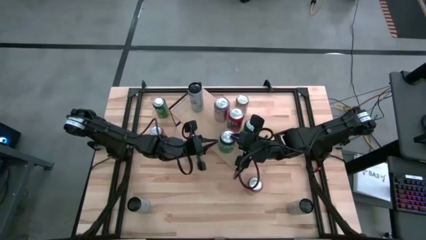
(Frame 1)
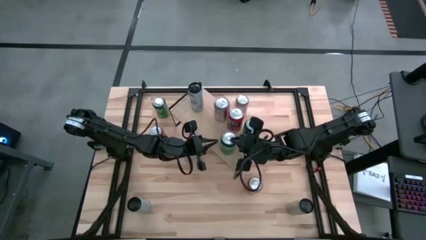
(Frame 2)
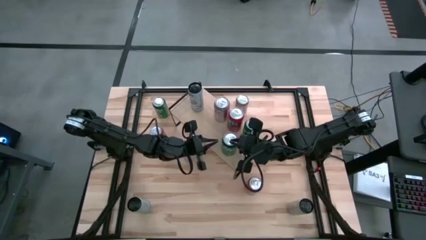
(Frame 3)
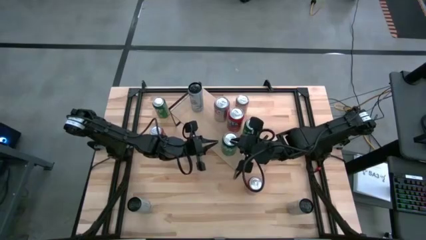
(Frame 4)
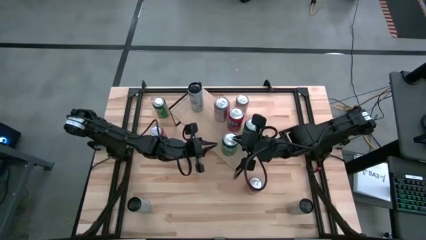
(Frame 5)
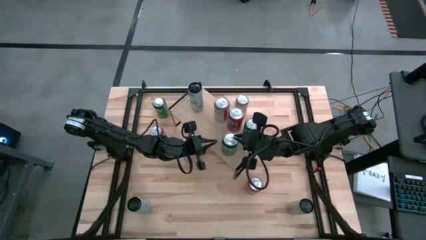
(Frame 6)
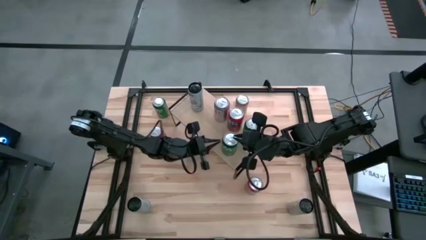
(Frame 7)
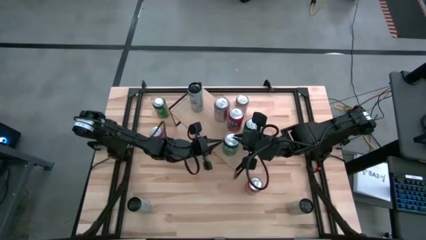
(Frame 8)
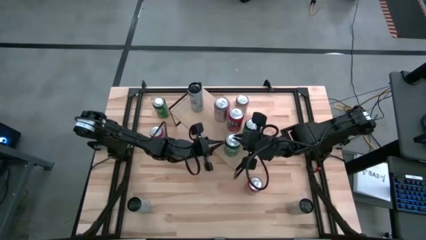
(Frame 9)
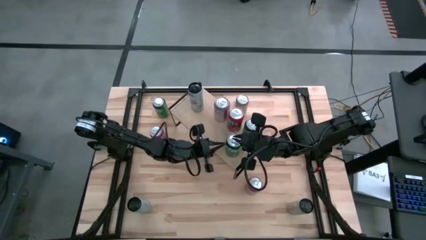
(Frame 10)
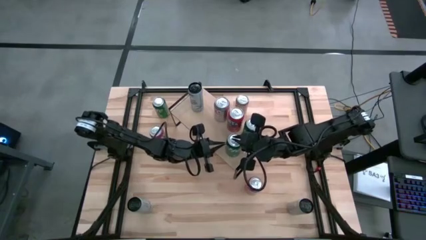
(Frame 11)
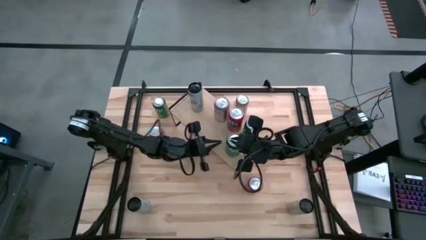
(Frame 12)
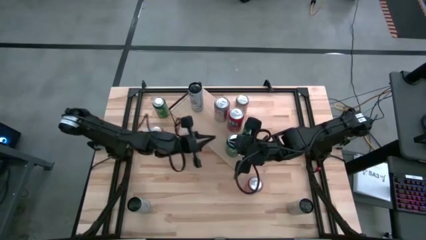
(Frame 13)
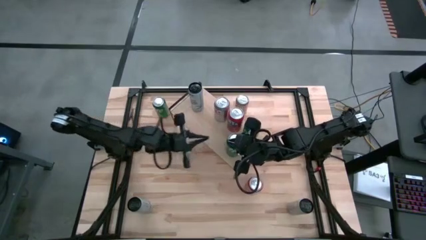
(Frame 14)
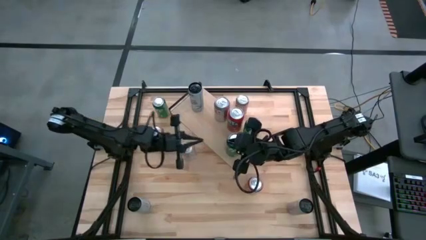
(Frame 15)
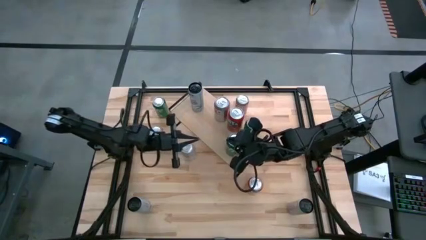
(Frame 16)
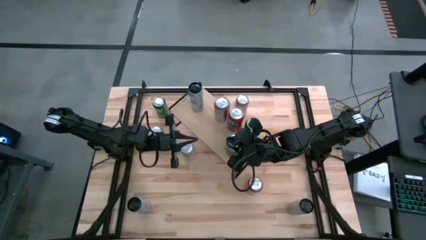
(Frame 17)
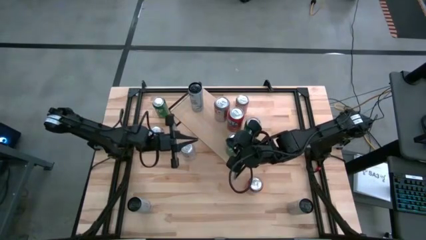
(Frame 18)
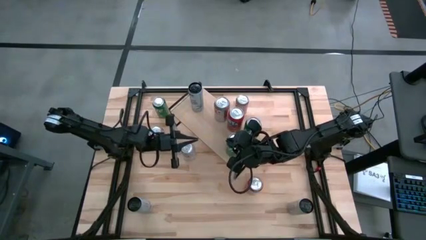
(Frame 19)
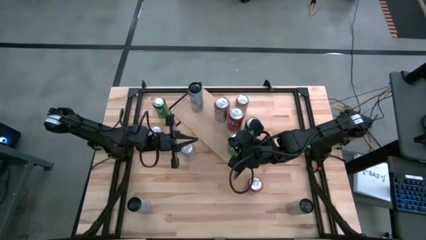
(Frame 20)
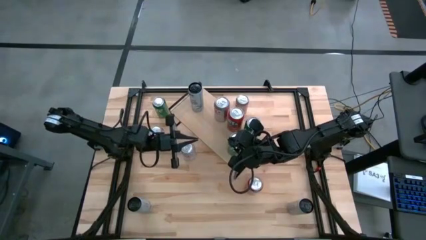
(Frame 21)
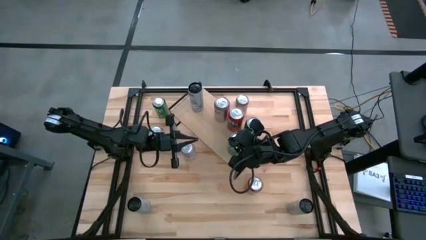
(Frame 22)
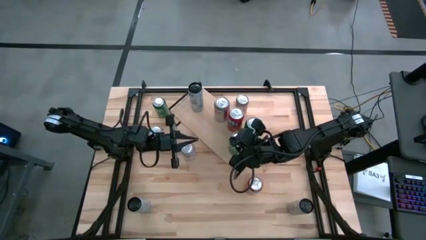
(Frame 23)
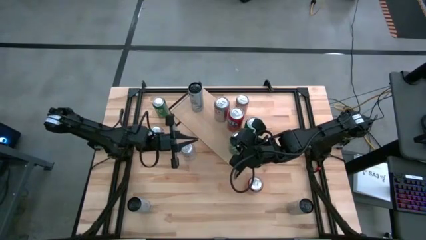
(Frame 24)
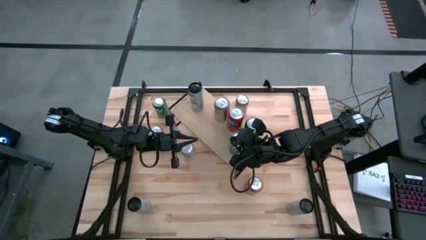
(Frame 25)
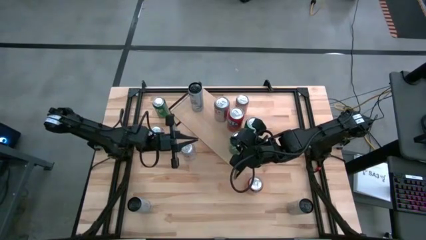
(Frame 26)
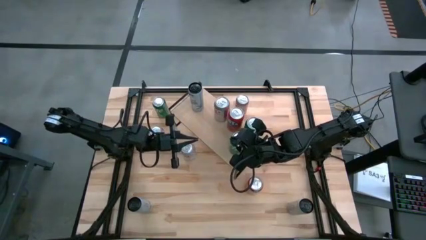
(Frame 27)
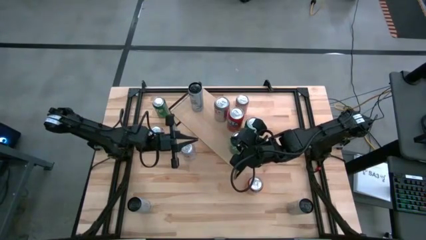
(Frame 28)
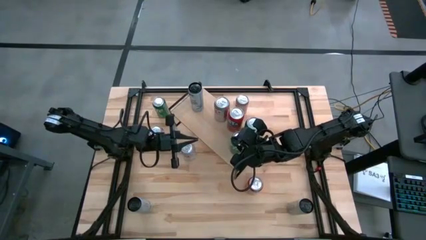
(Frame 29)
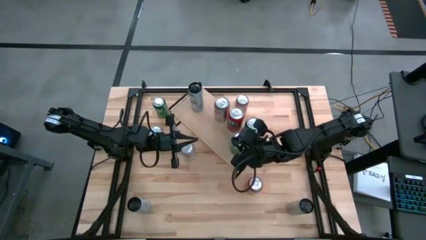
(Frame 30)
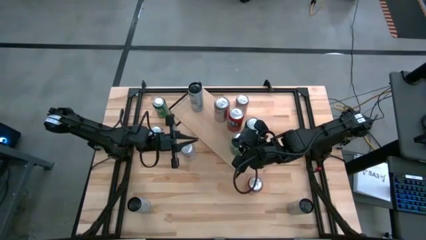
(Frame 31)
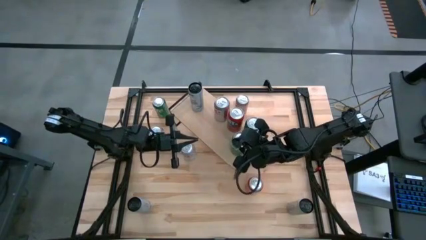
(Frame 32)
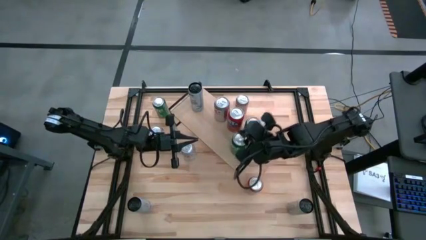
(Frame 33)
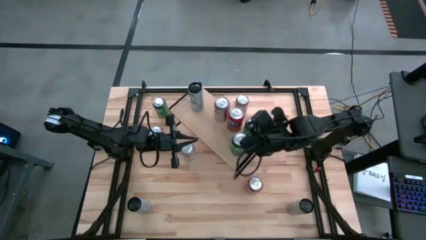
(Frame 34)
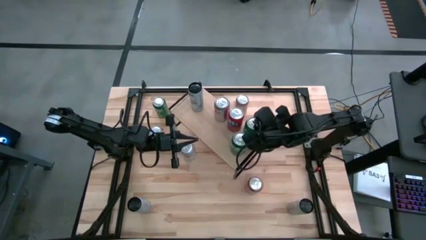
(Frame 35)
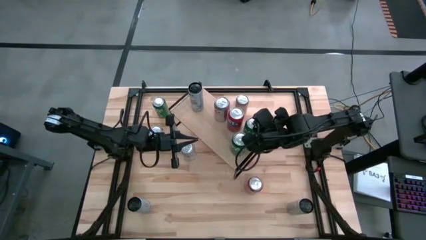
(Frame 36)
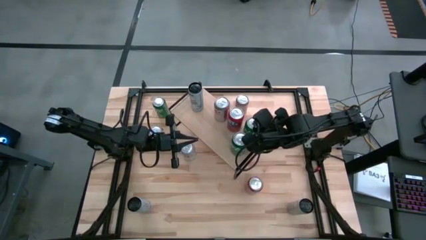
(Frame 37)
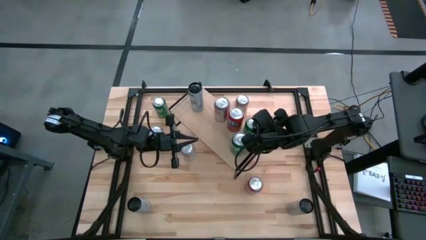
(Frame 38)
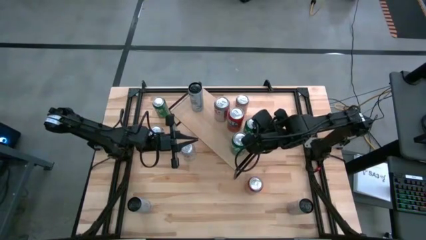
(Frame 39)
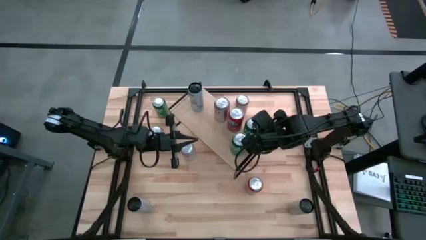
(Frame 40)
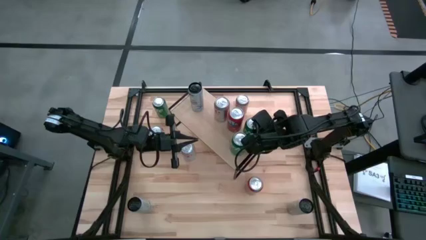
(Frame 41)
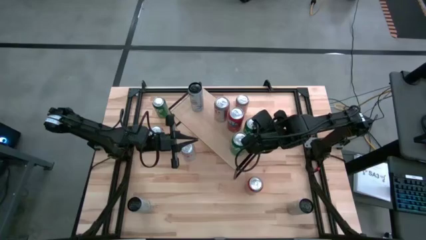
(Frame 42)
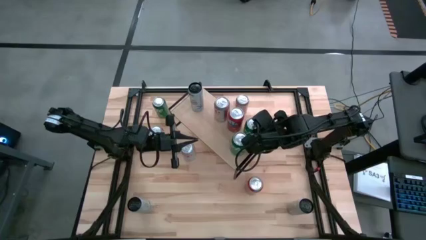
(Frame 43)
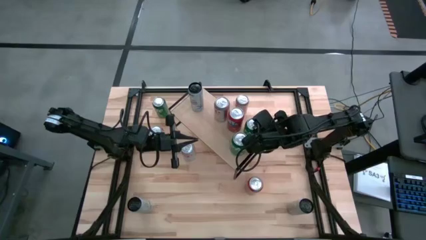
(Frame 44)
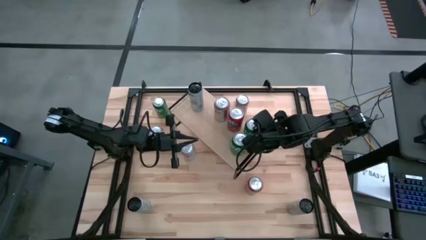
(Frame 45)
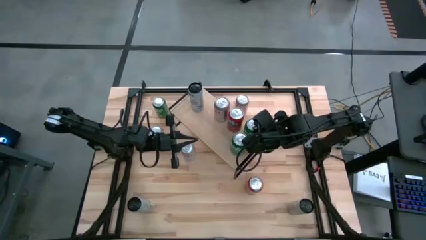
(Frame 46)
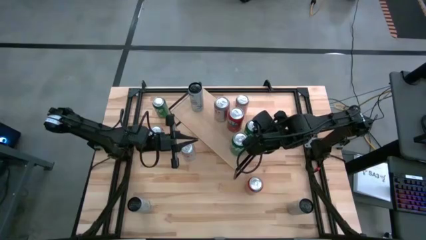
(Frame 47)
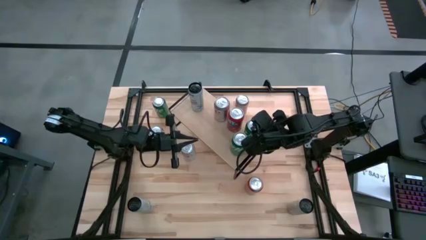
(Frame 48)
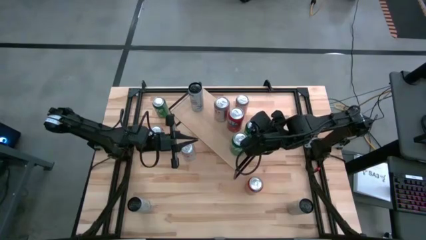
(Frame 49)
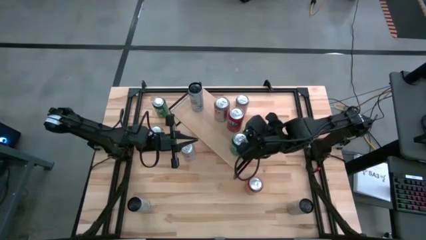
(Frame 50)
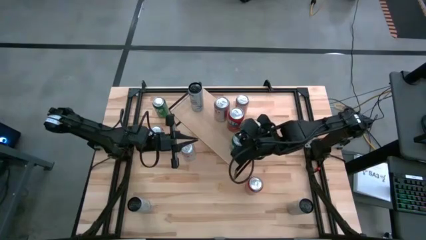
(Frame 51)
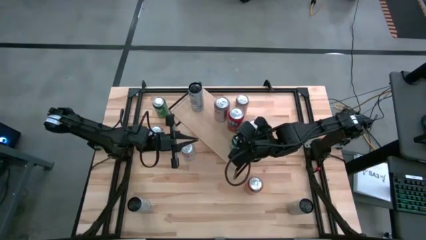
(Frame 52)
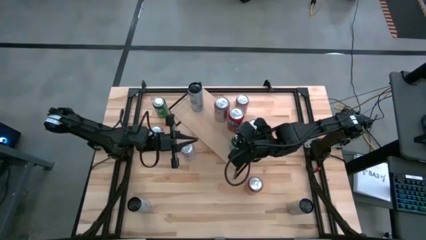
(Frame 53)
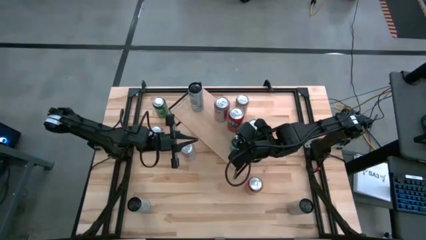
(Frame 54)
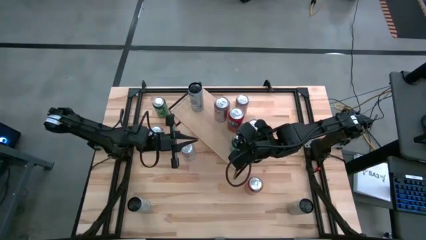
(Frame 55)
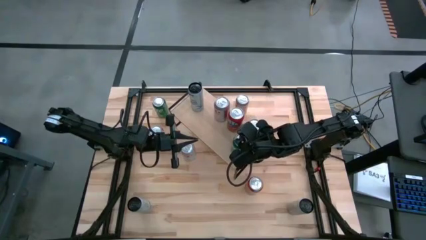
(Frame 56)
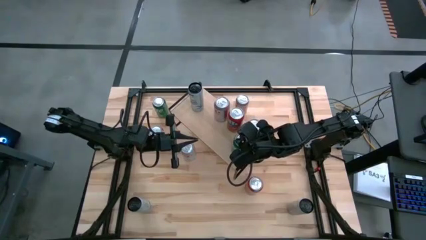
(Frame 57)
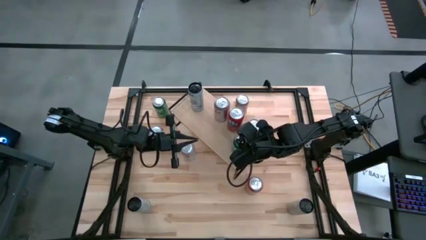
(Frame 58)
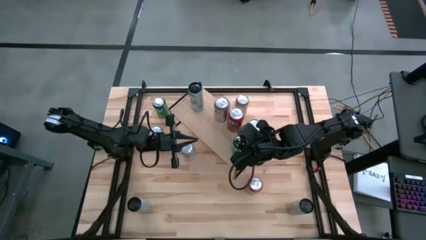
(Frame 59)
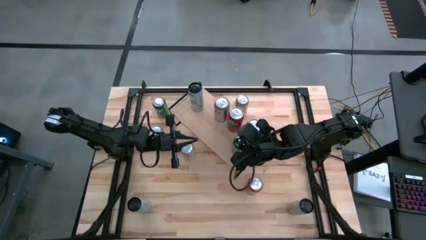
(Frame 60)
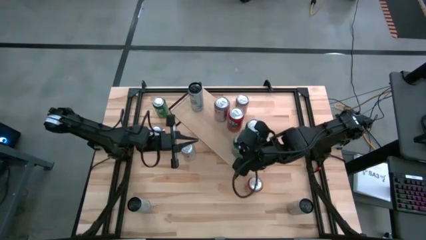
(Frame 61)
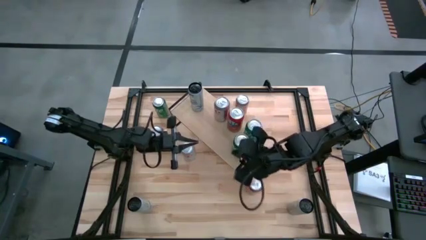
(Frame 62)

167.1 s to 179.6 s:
Task: Place canned beverage on shelf
Put the bottom green soda can on the shelf aligned with the other green soda

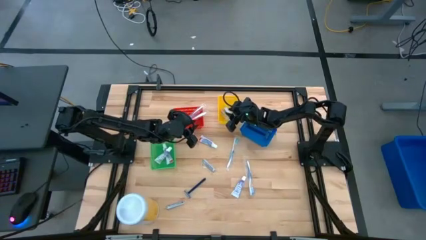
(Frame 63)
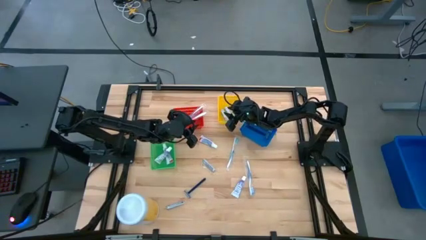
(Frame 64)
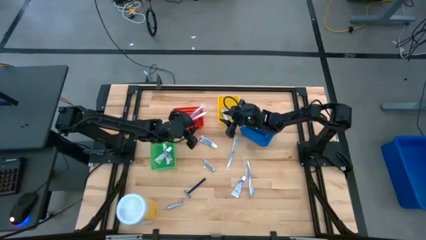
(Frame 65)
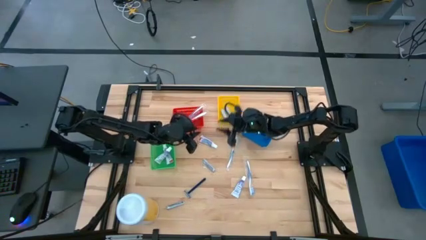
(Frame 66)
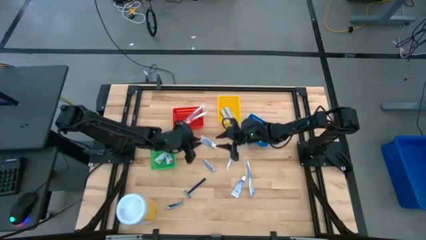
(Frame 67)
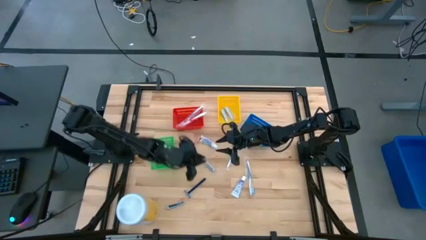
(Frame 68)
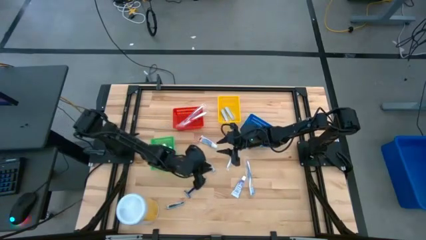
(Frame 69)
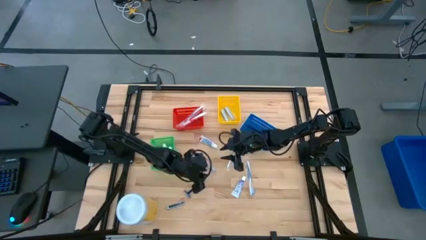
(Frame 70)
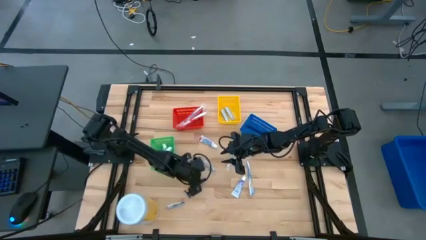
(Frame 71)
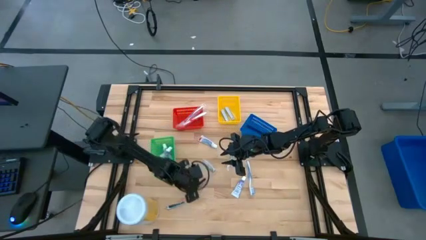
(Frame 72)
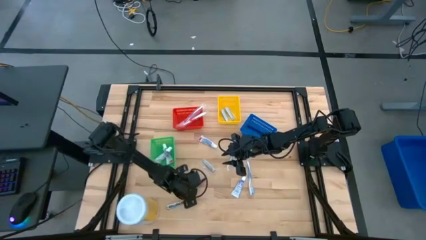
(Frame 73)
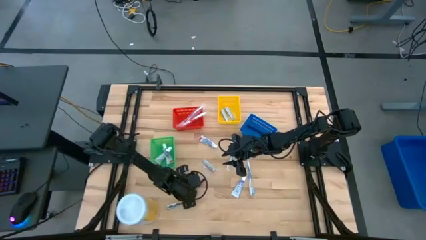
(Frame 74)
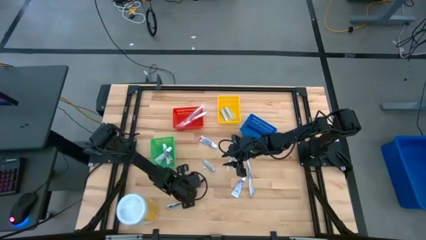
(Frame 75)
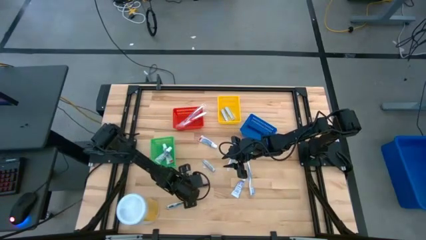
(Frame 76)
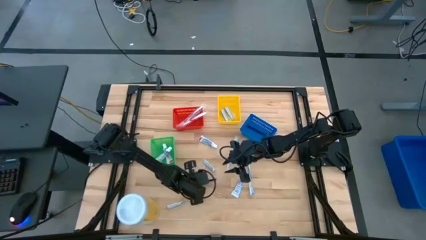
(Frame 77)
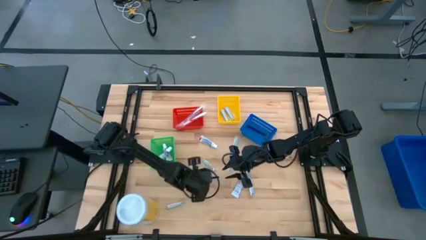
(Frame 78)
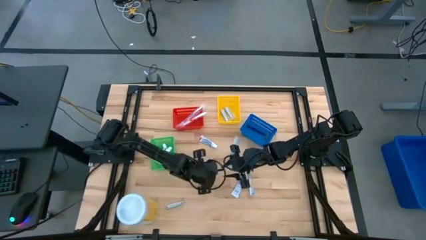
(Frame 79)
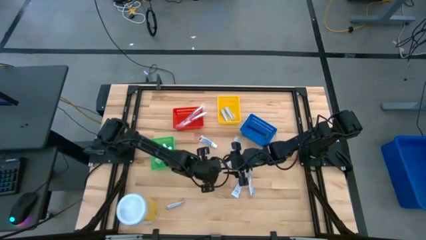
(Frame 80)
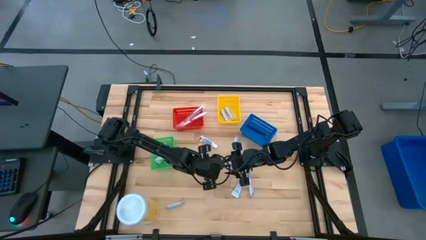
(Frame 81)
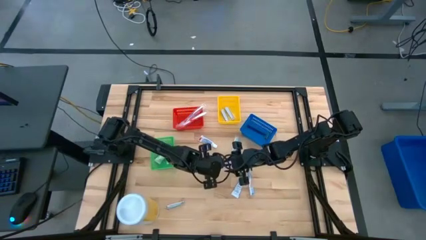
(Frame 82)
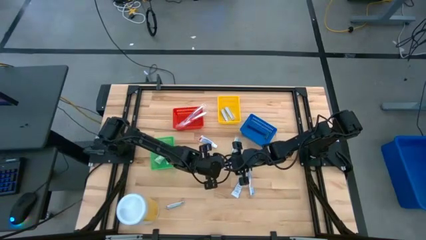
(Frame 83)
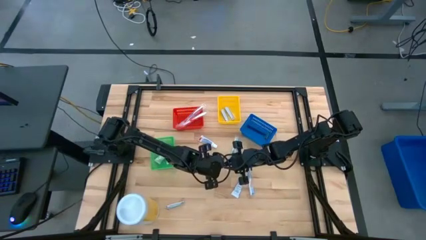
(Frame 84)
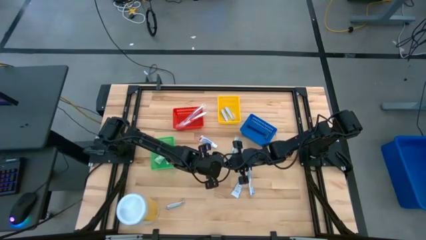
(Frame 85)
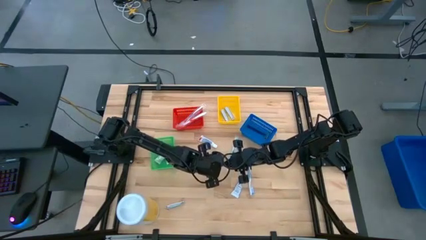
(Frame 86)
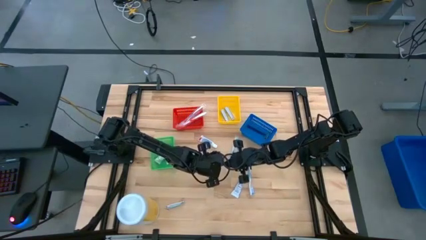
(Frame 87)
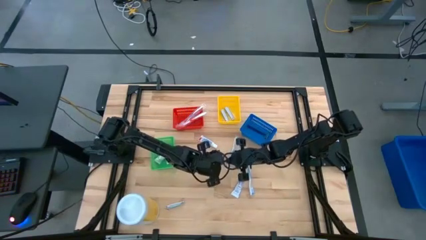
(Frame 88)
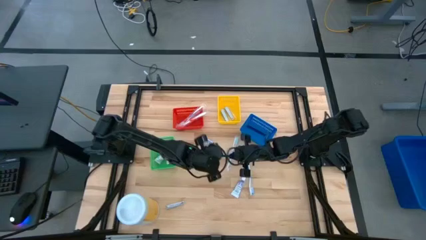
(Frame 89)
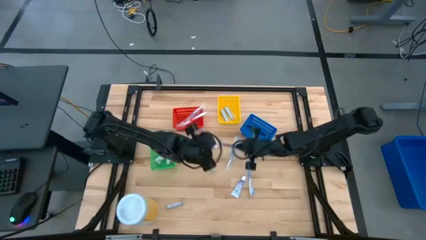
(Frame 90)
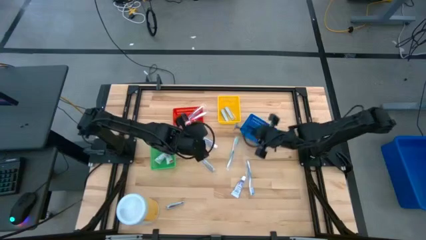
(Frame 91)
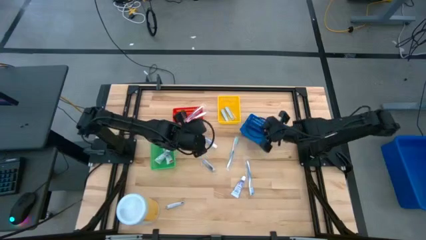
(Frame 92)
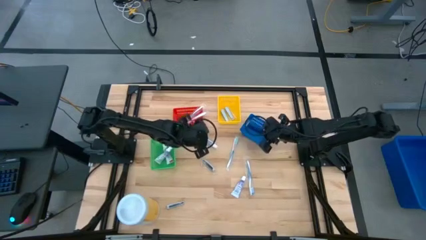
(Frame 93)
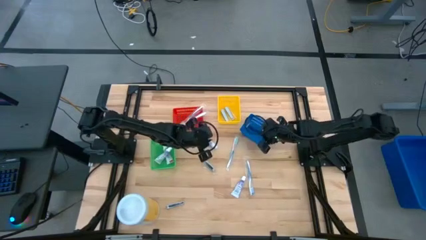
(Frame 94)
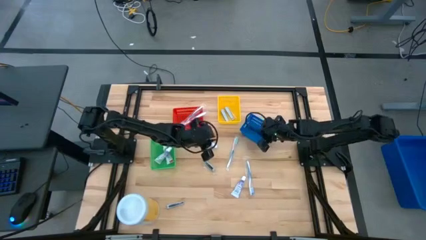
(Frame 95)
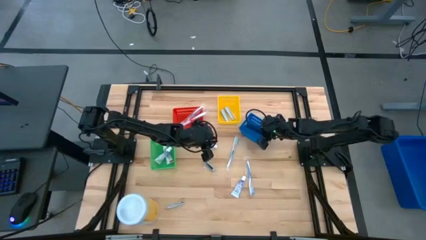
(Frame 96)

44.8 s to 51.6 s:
Task: Pick & Place Travel size toiletries
Put the blue razor into the blue bin
